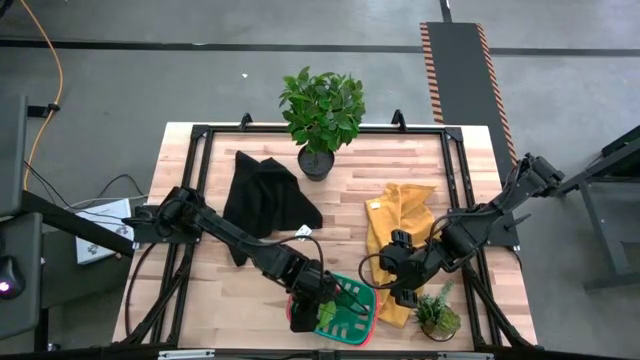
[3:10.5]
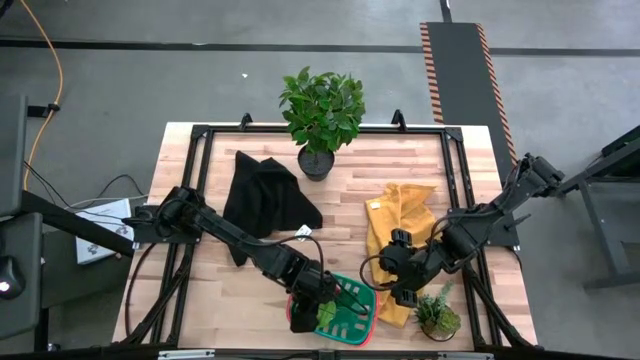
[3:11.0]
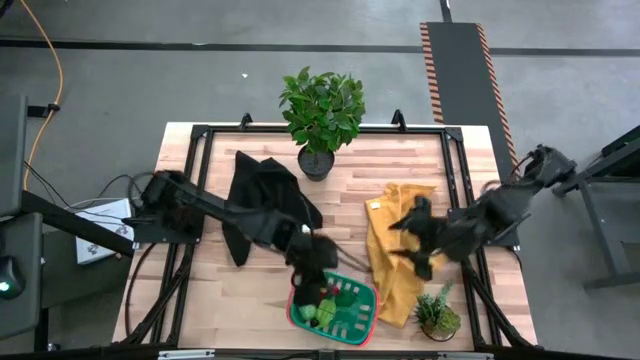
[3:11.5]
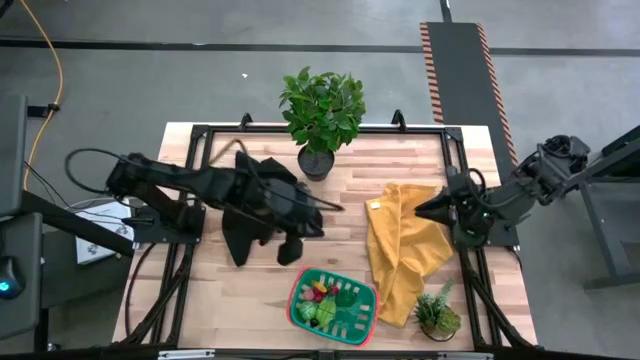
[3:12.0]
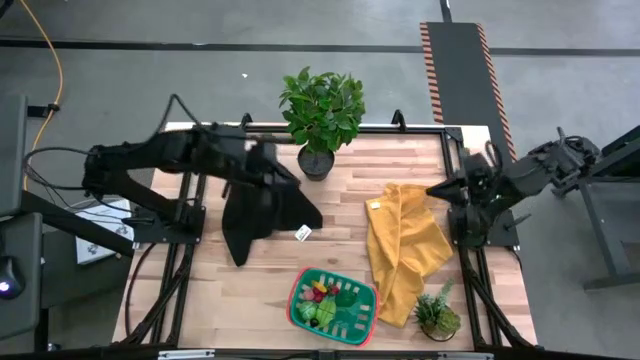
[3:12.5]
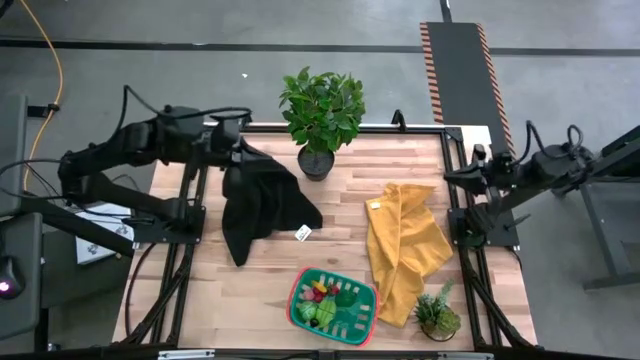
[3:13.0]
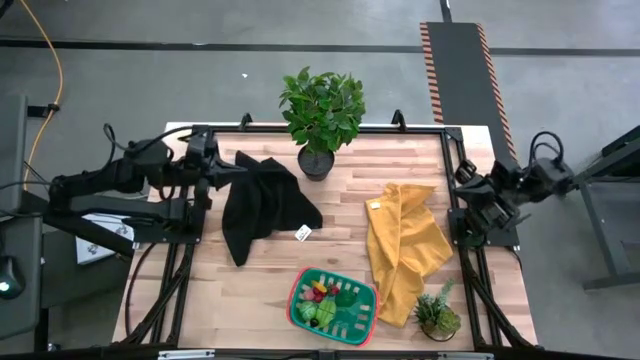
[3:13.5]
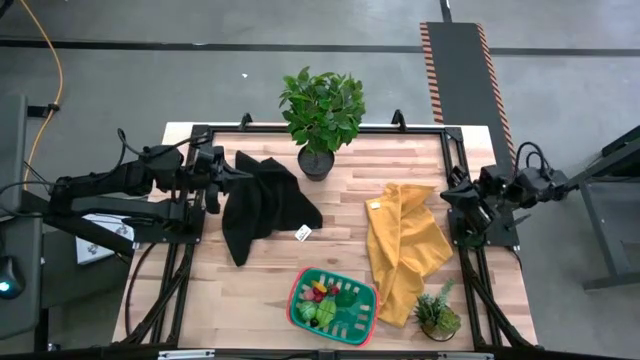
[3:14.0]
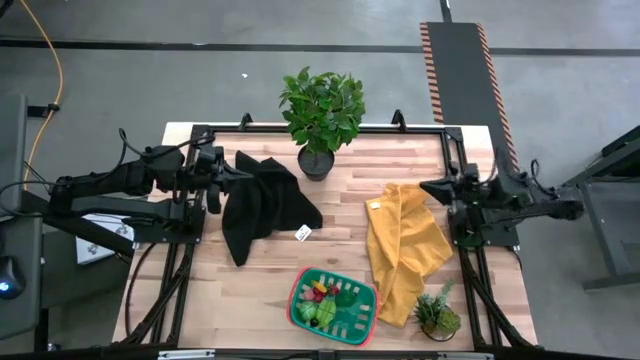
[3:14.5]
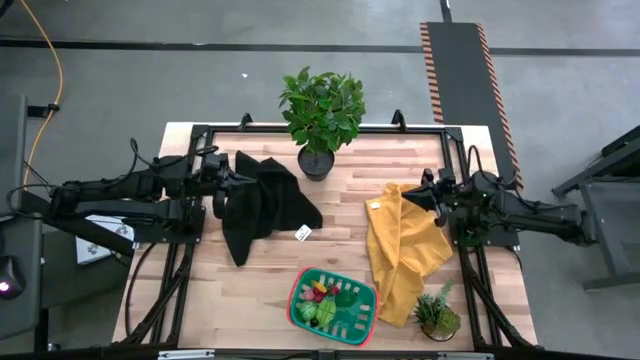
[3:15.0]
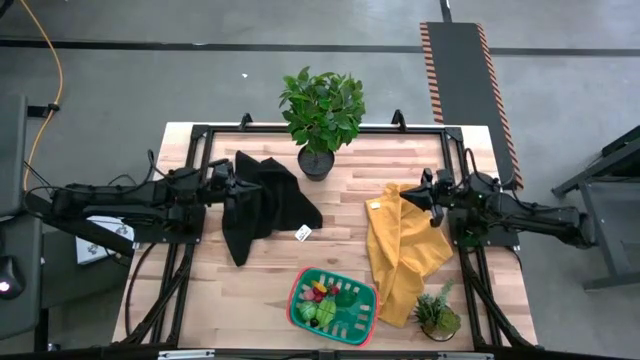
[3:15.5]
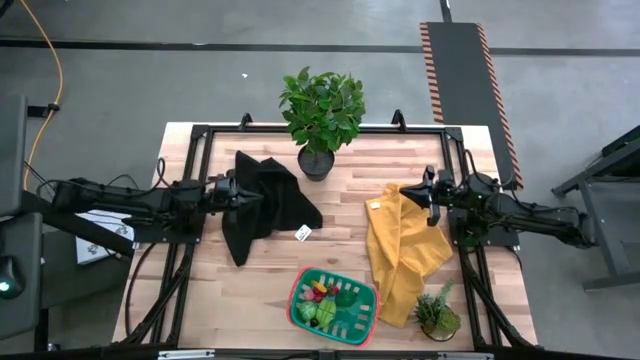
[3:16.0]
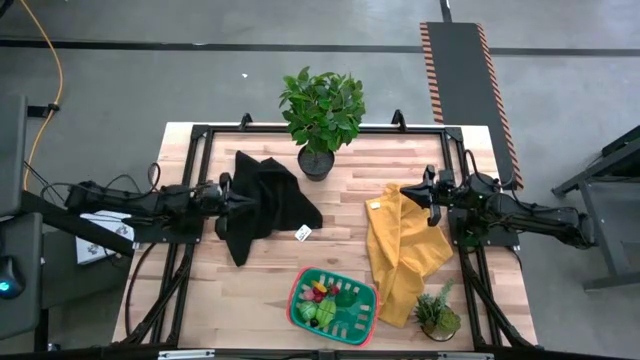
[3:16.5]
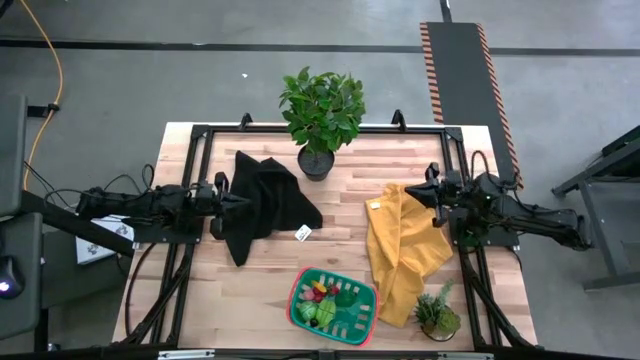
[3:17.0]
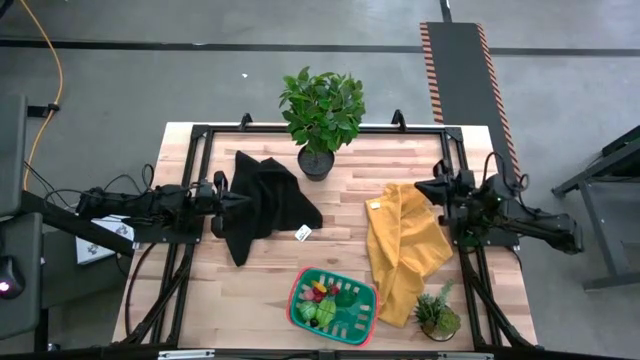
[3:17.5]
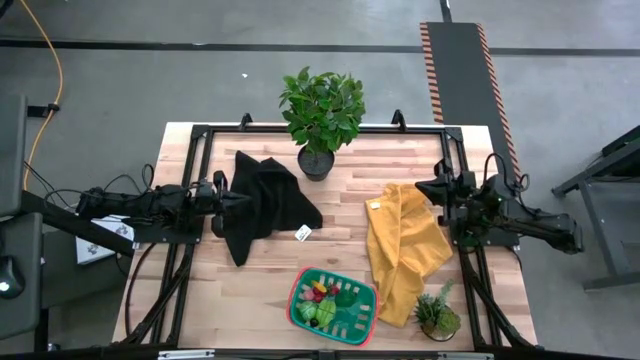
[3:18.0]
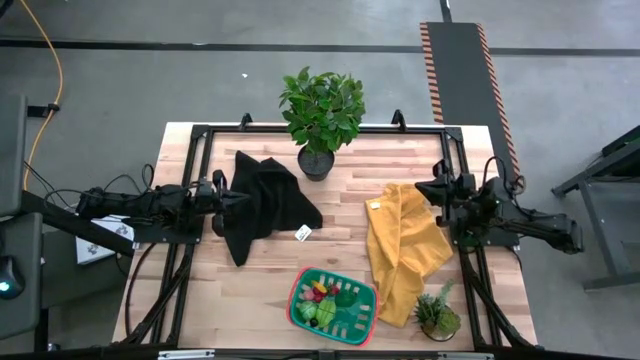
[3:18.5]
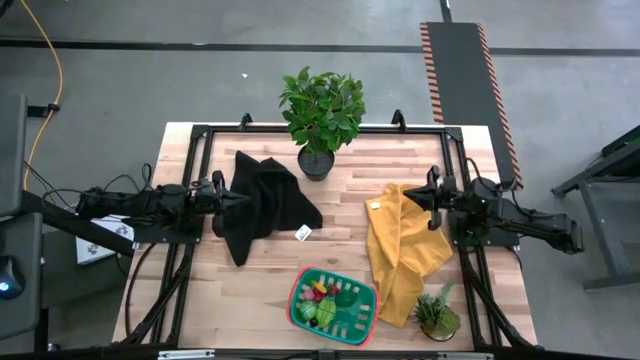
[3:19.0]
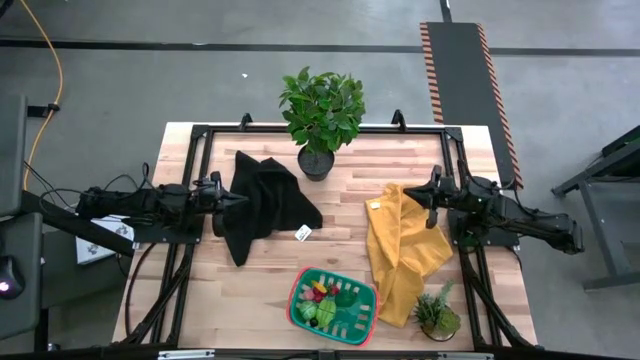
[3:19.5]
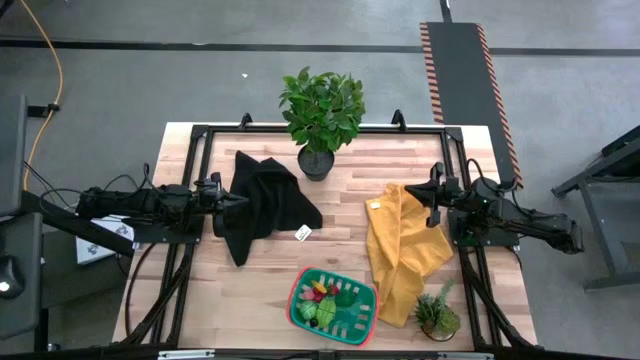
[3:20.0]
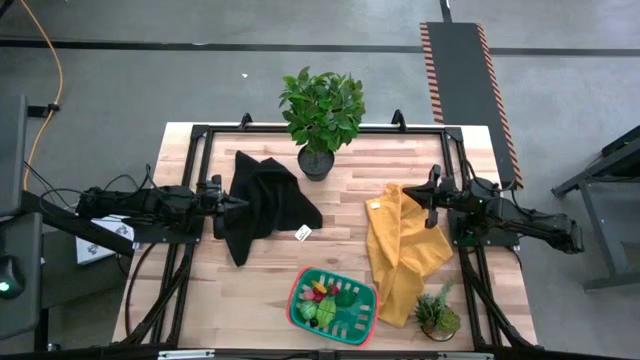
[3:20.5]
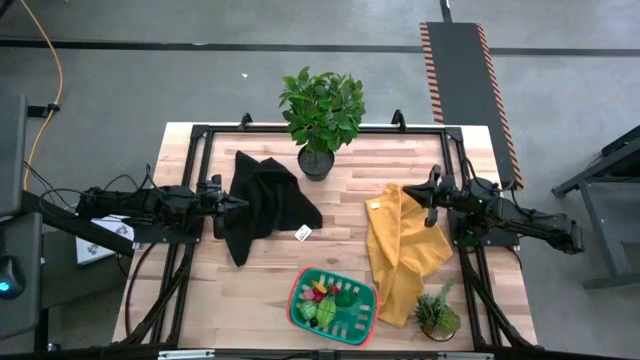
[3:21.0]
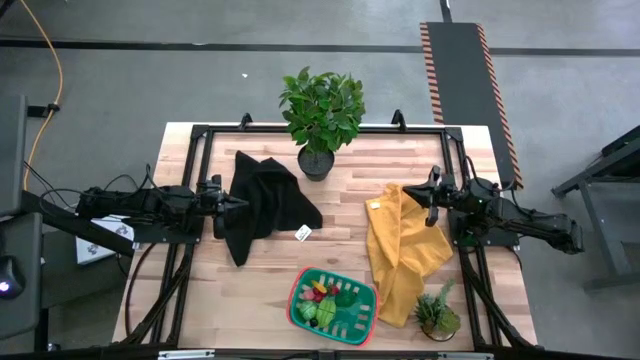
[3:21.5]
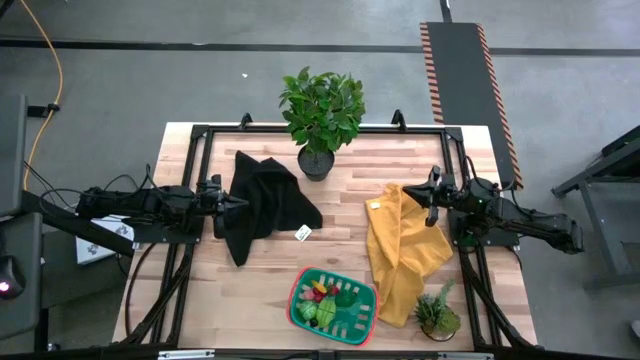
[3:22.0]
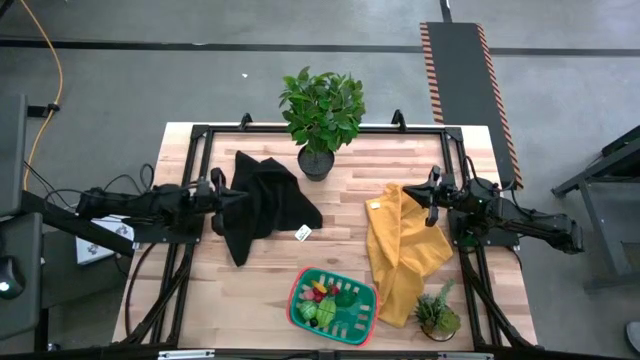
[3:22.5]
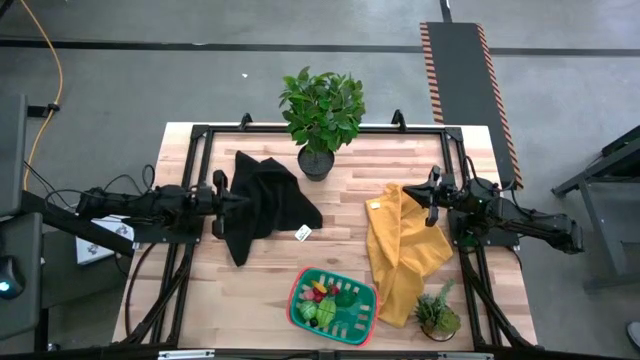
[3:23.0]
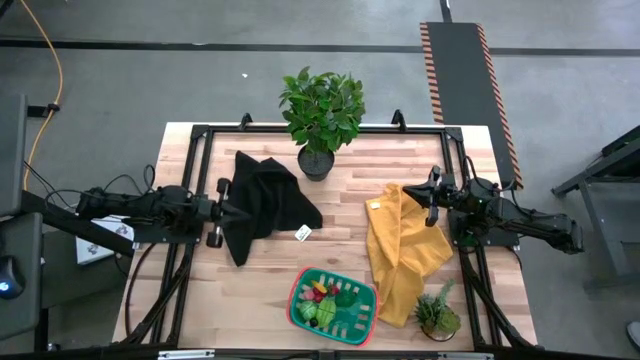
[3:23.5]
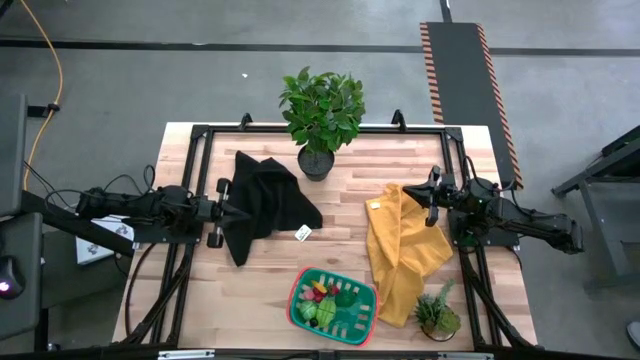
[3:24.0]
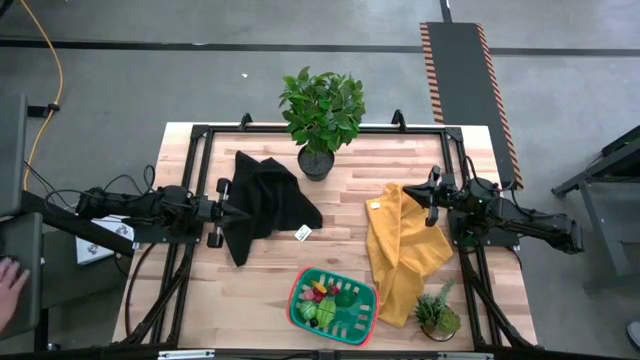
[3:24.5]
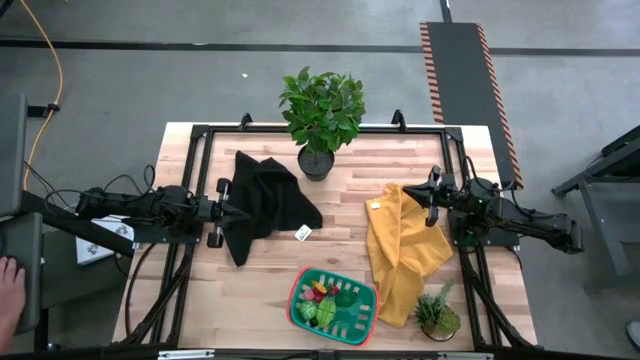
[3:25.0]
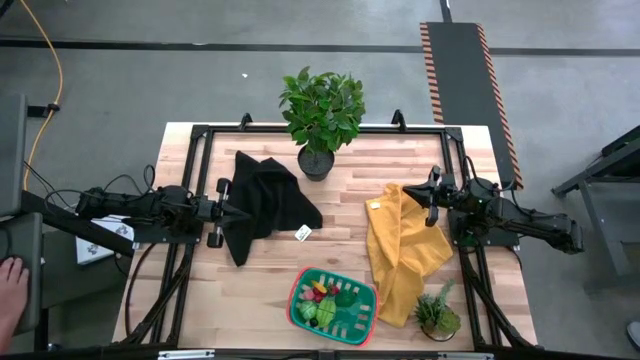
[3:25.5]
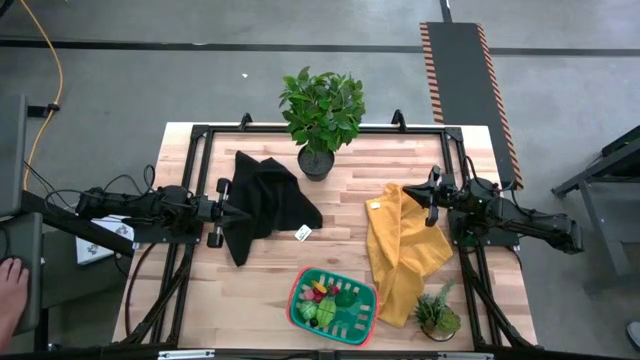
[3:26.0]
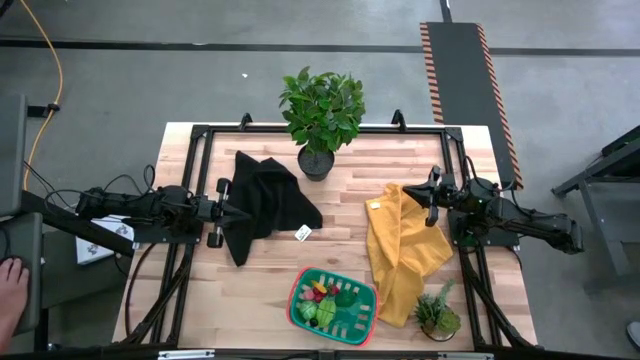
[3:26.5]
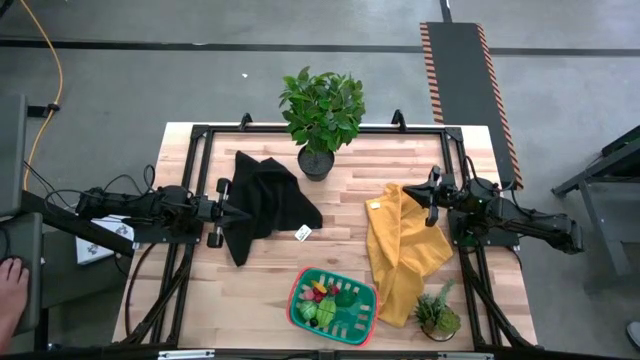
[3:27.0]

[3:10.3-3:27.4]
Task: Pick and placing Produce into tupperware
Return to Home Position

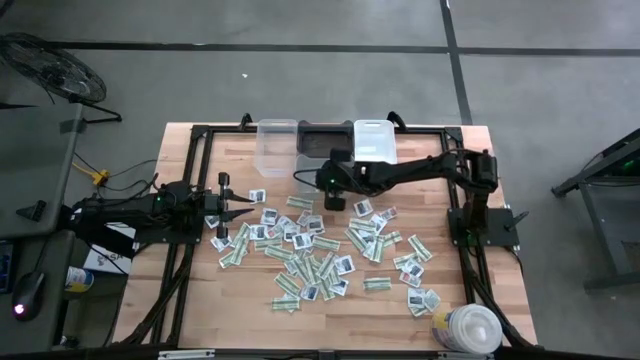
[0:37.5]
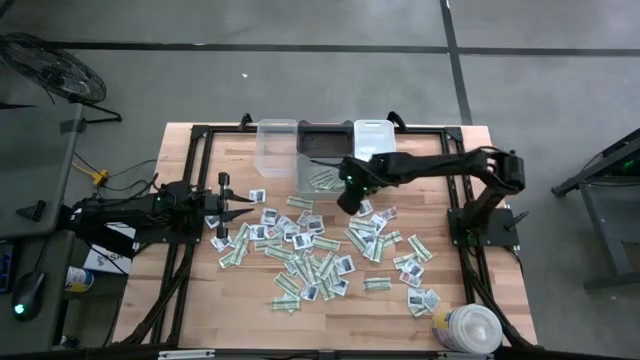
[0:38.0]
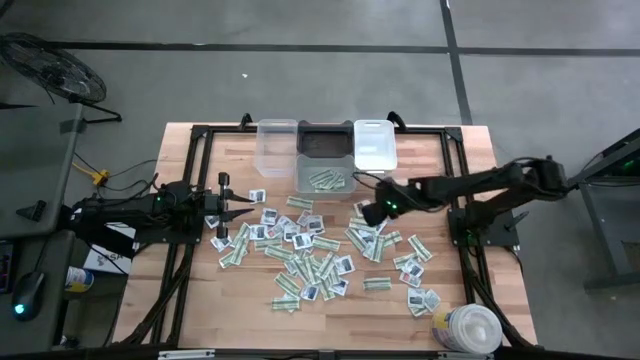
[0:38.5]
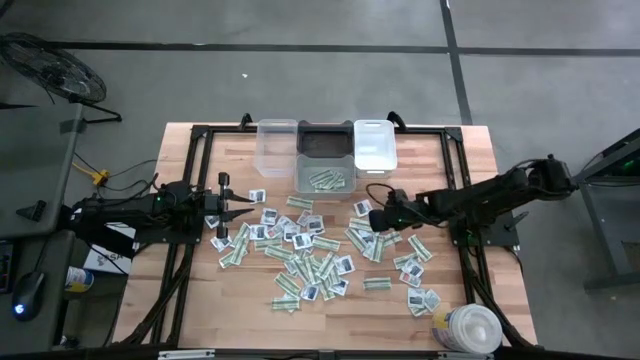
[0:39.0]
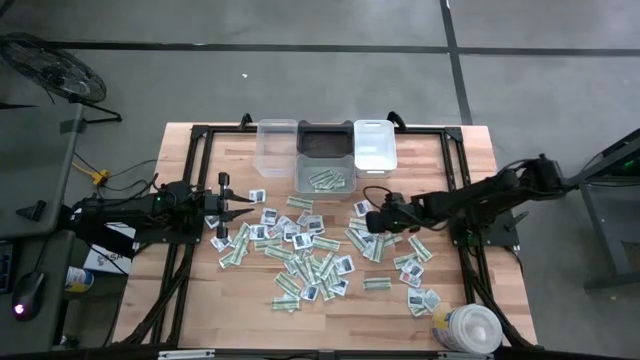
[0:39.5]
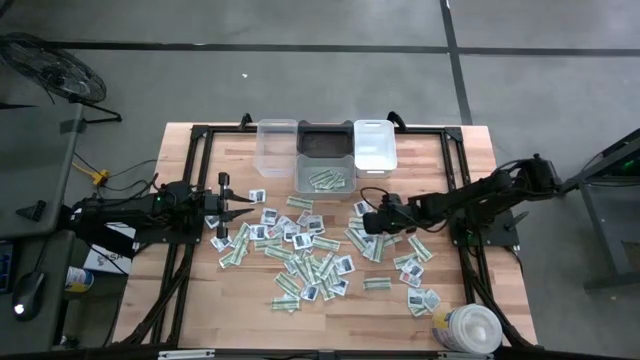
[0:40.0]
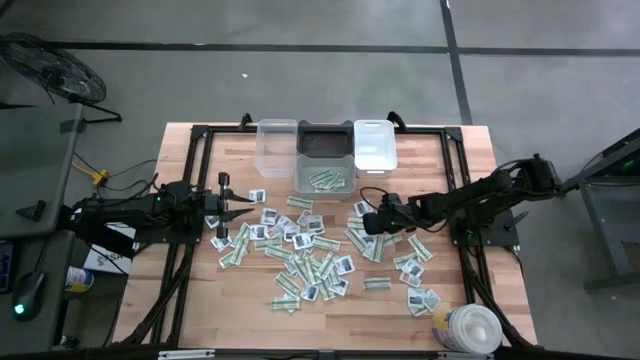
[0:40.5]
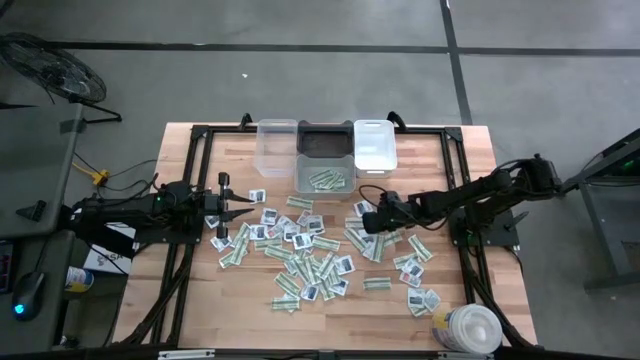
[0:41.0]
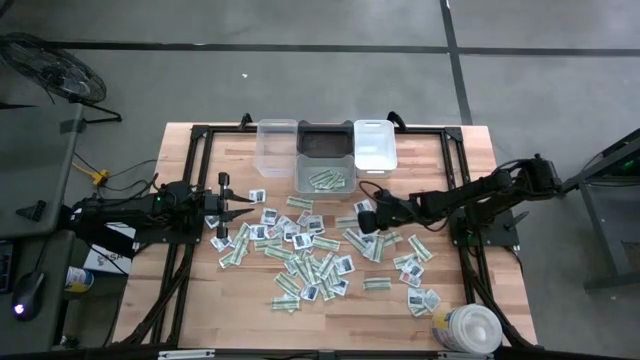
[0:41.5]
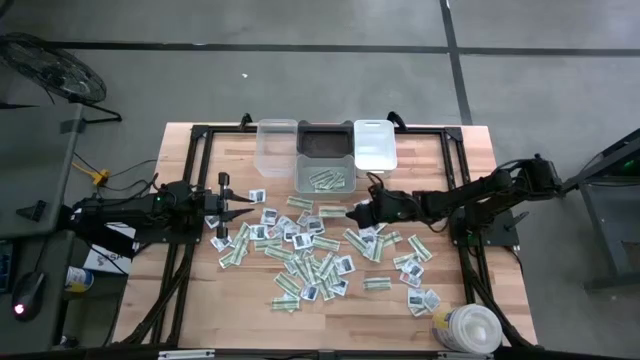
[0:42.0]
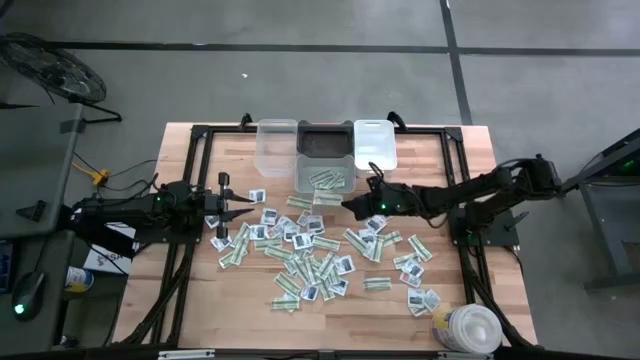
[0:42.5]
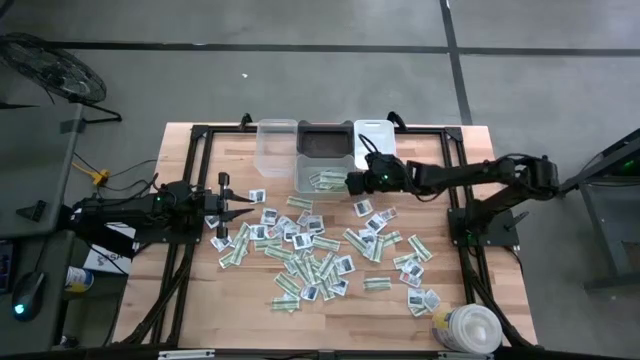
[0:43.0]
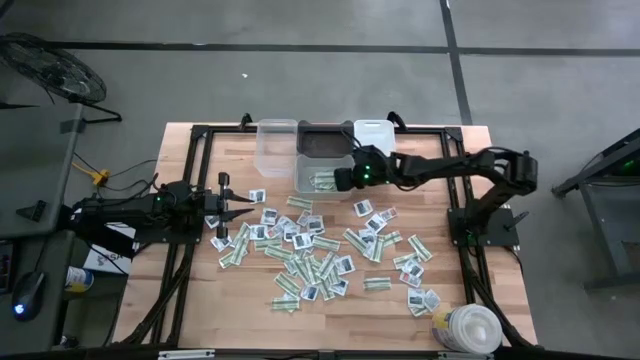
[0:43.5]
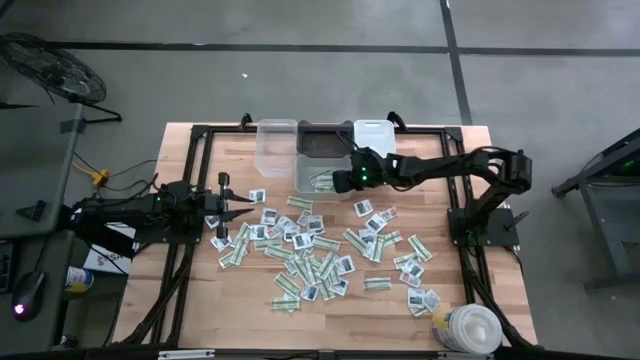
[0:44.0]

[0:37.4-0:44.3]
Task: Pick & Place First Aid Supplies
Put the bandage pack into the gray bin
